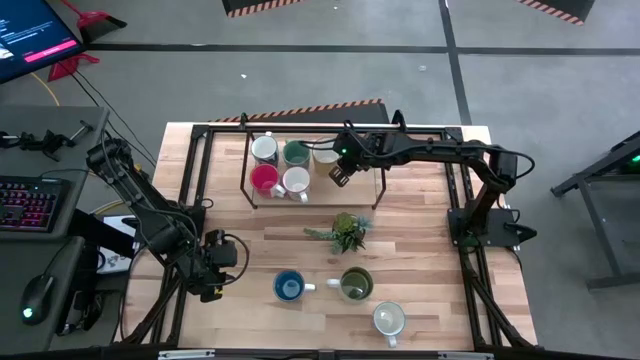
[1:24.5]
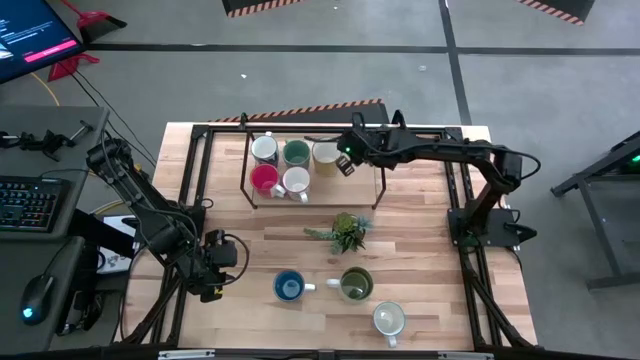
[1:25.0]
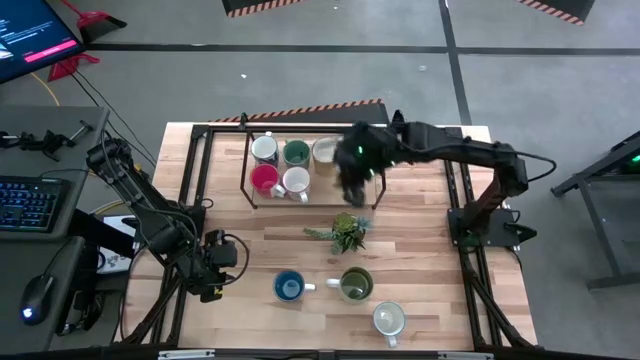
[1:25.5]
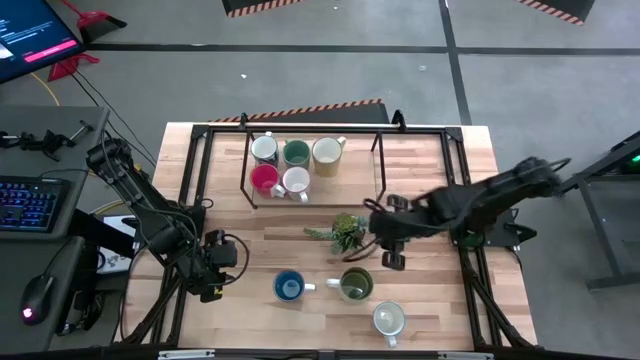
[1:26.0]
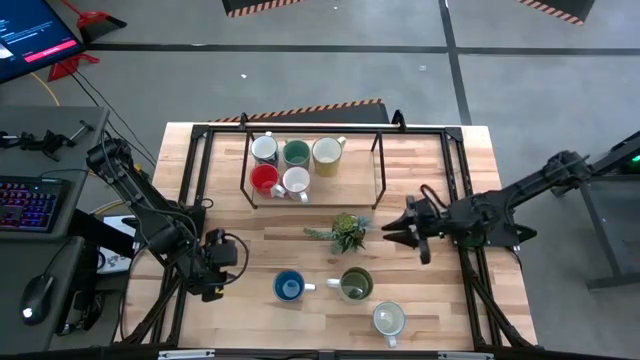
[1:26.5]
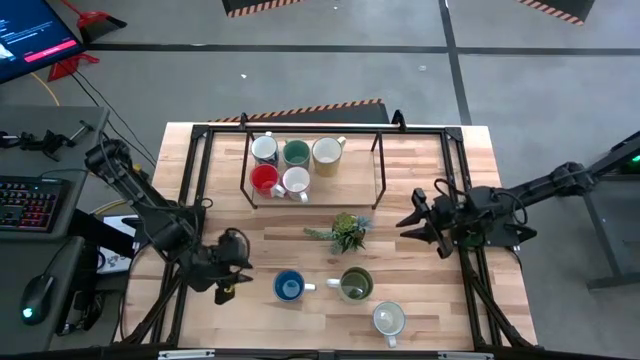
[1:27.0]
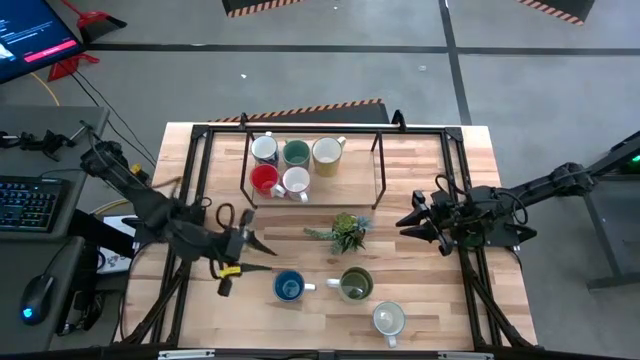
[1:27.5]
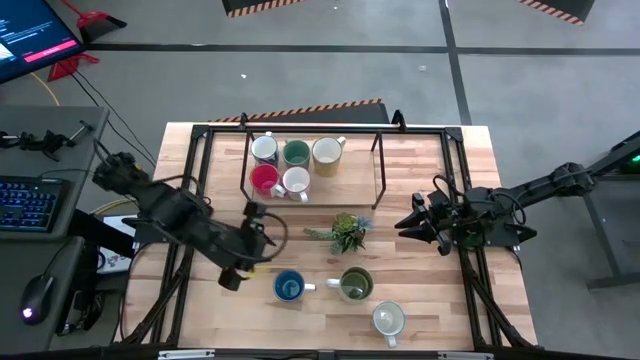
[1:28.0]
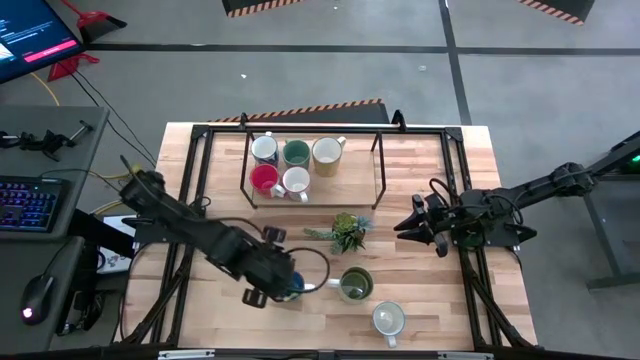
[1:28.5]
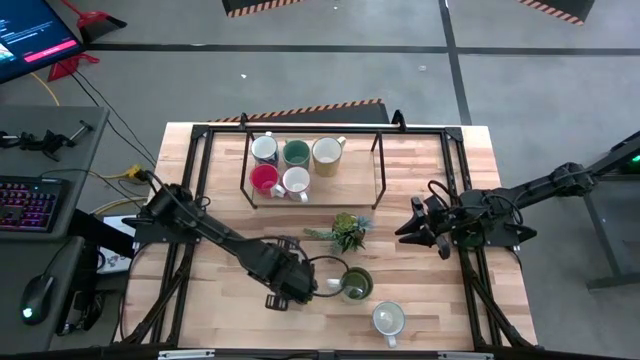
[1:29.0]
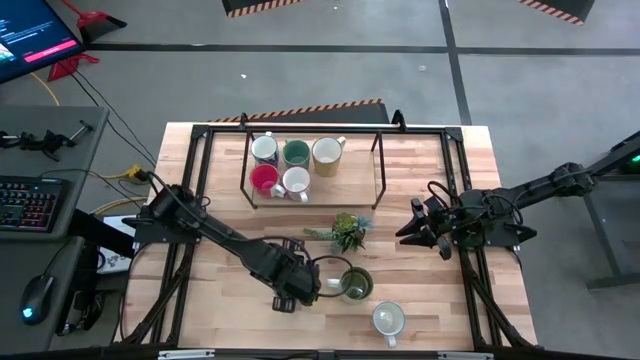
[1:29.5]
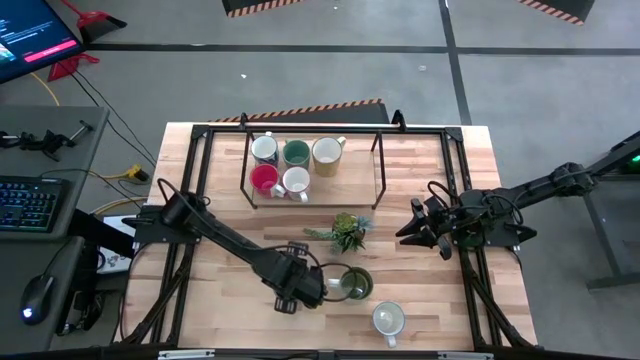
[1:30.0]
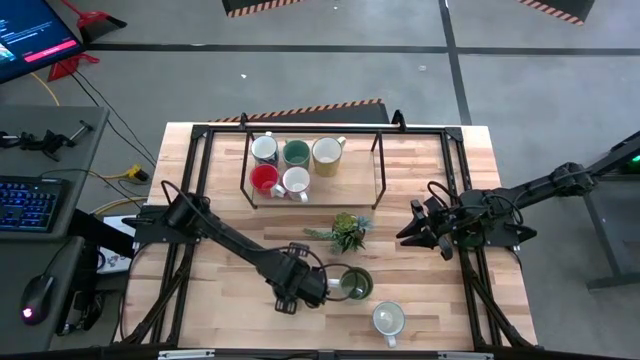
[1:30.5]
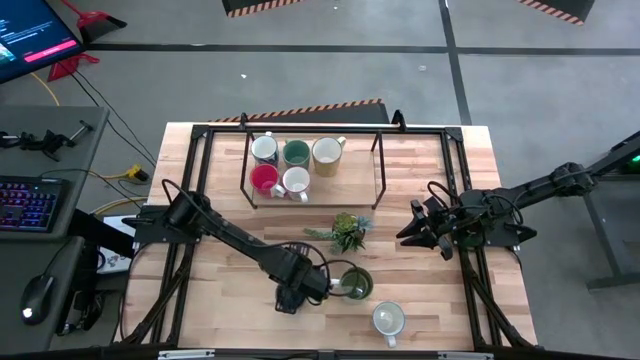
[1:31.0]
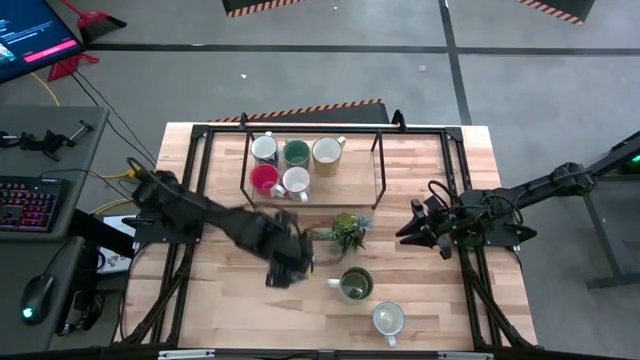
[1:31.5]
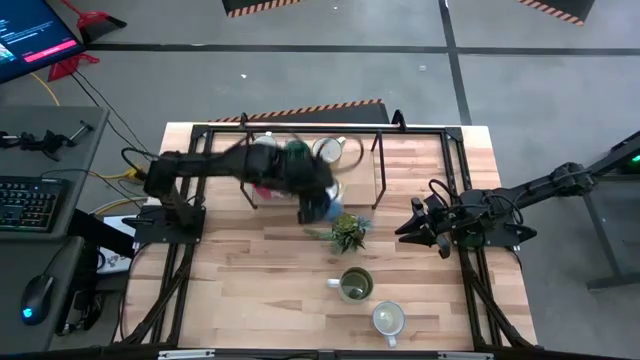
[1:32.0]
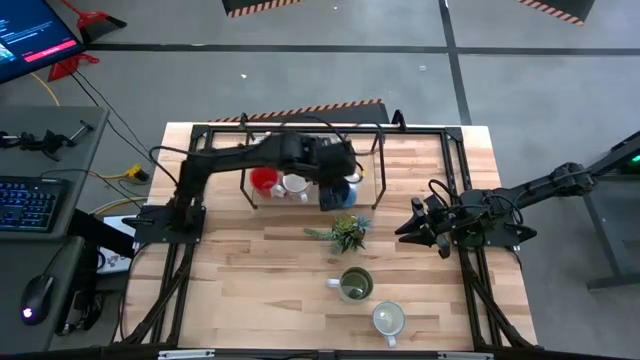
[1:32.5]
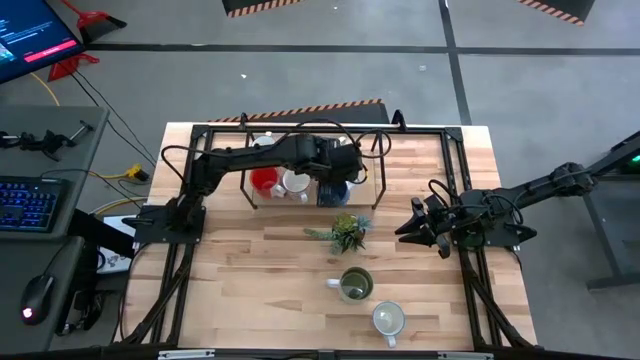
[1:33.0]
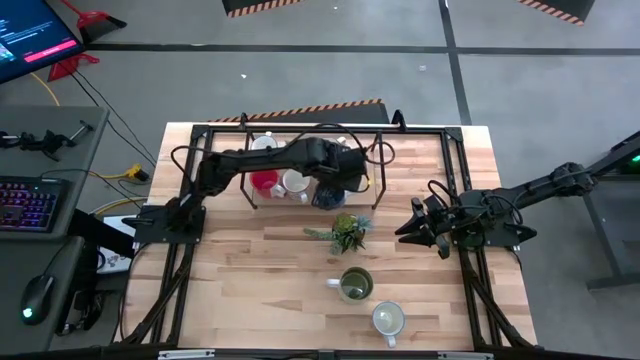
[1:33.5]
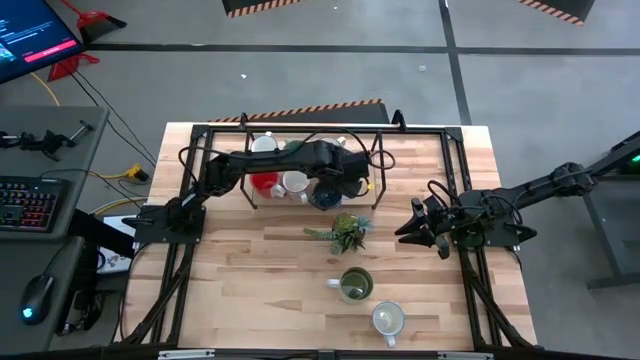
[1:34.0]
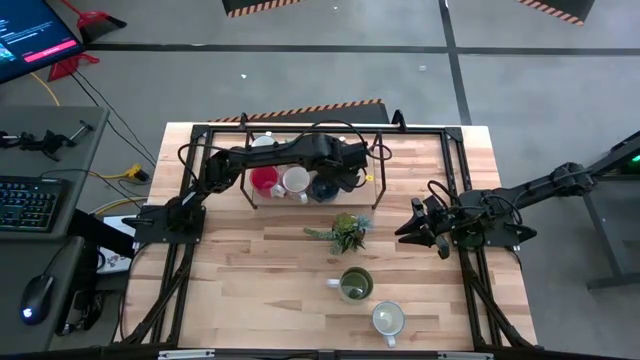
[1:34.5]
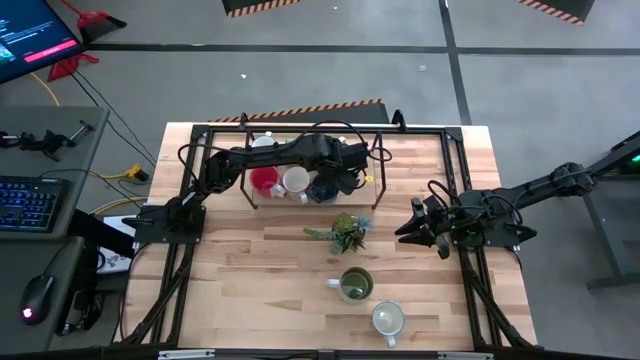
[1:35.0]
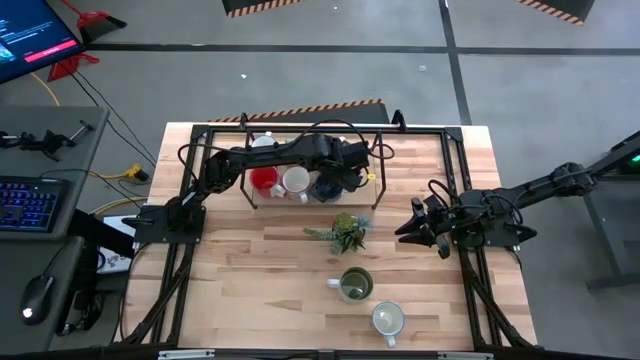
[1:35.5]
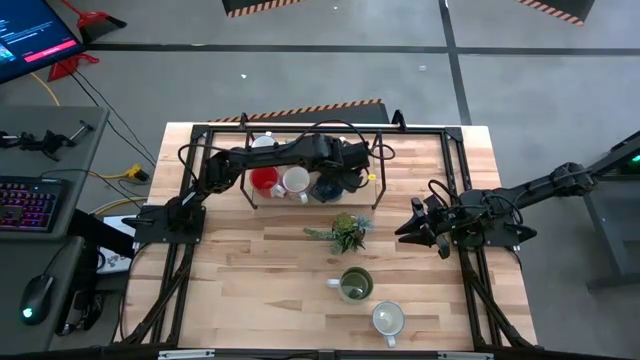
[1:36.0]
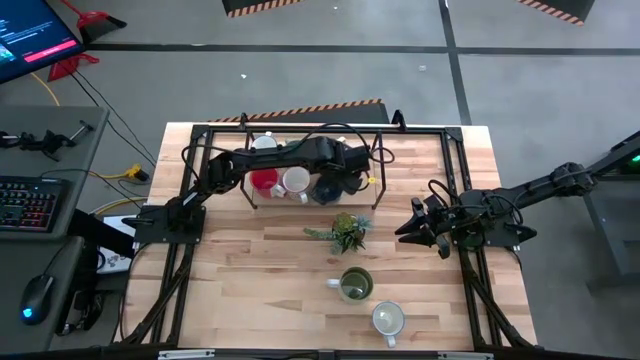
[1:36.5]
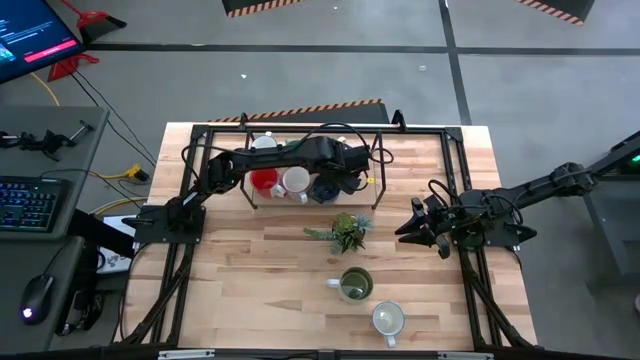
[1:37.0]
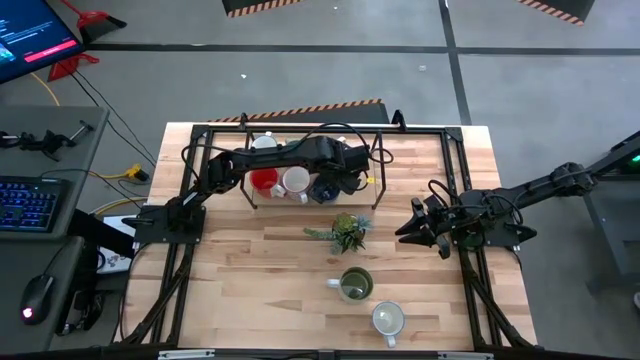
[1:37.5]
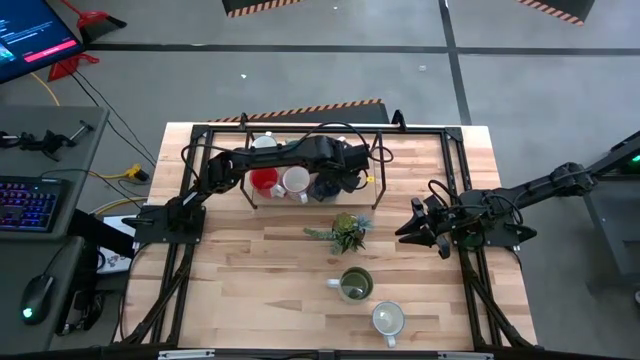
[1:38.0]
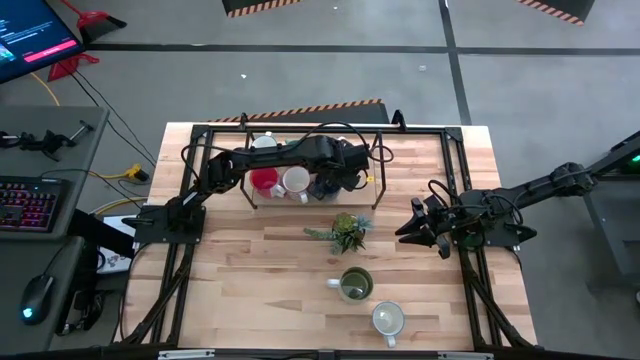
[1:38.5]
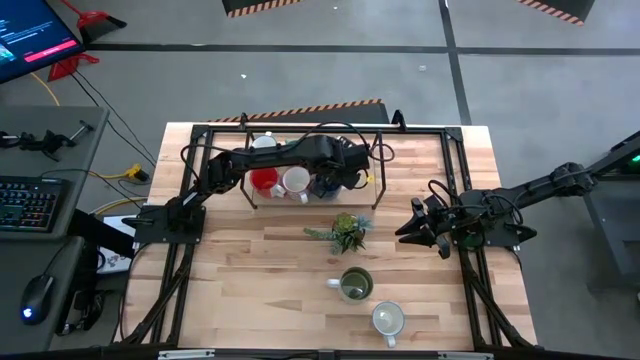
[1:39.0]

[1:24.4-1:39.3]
Task: Place coffee mugs
Put the blue mug on the shelf

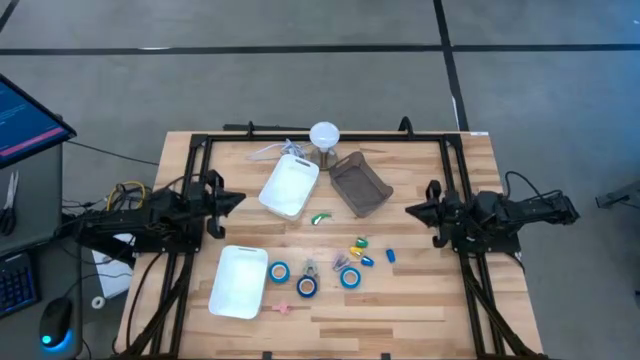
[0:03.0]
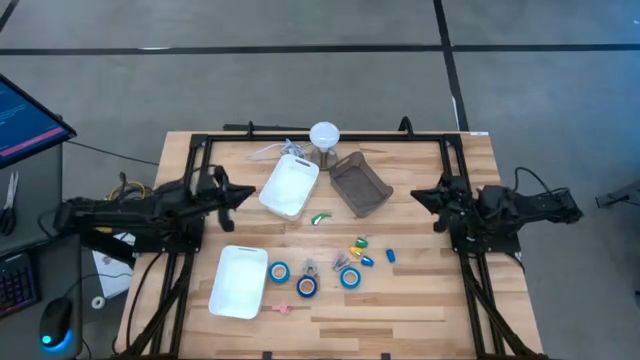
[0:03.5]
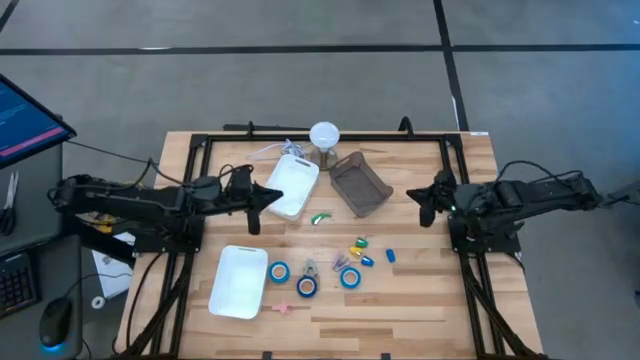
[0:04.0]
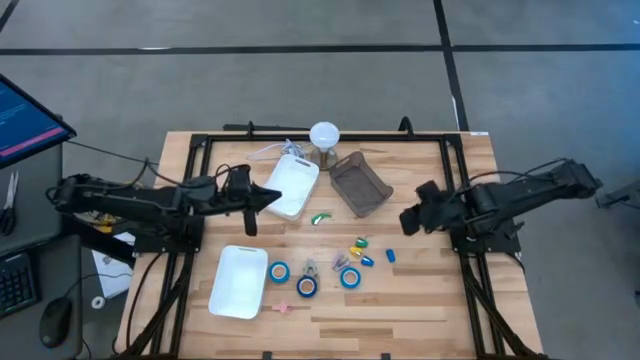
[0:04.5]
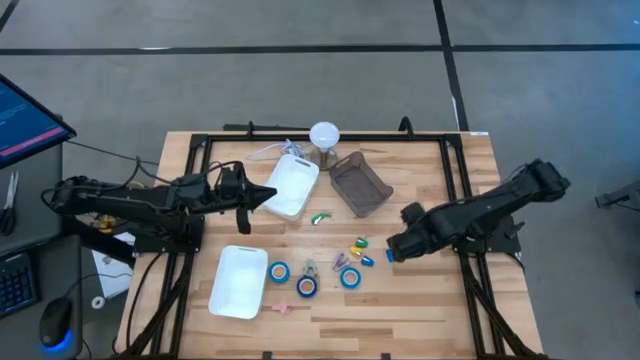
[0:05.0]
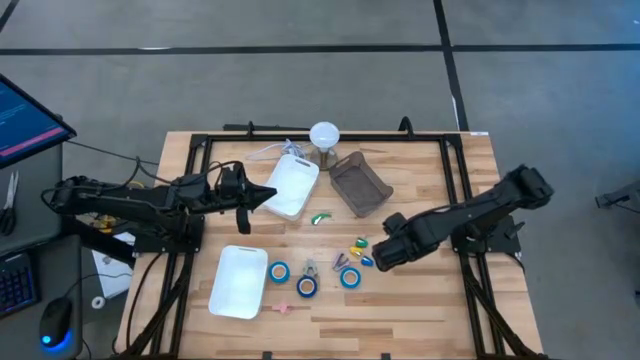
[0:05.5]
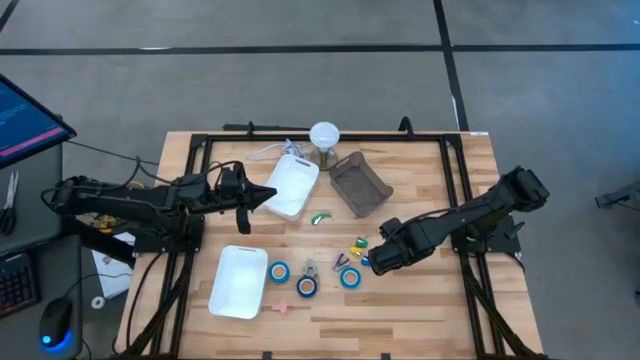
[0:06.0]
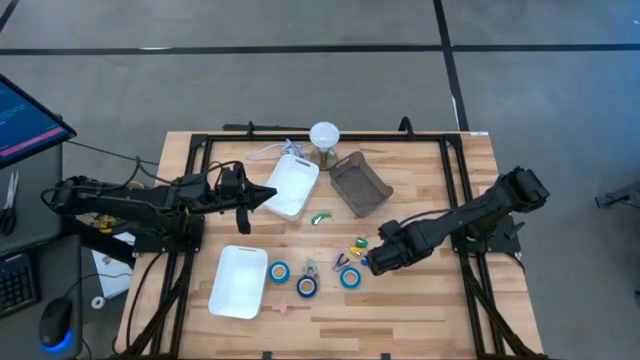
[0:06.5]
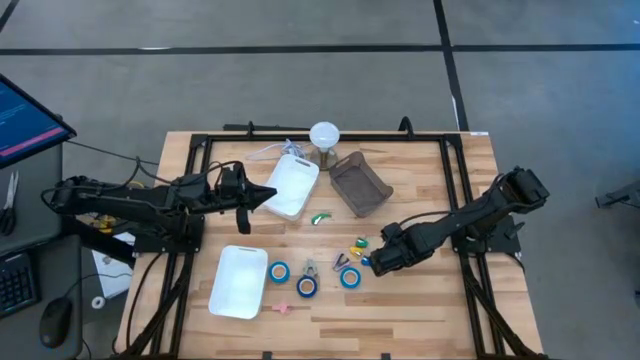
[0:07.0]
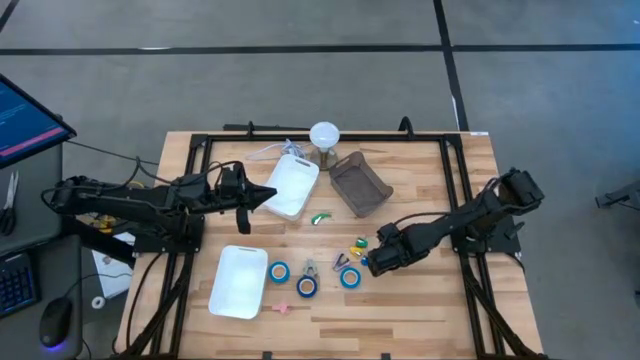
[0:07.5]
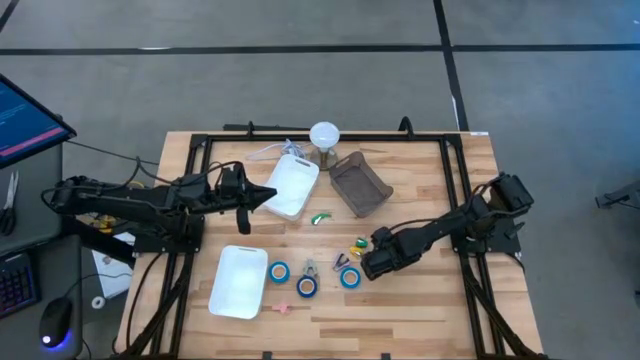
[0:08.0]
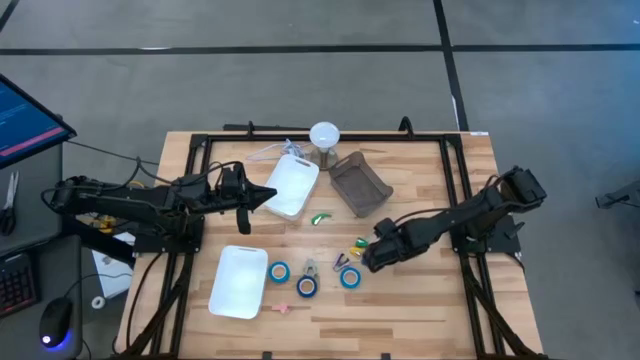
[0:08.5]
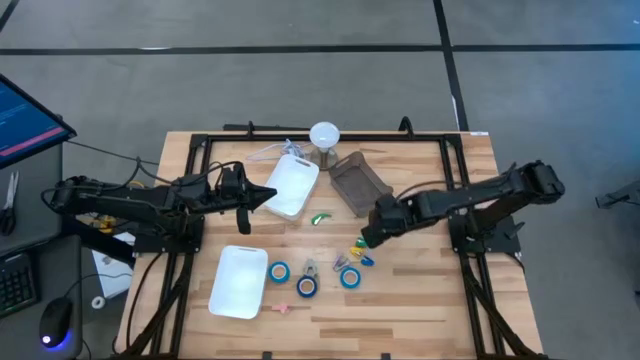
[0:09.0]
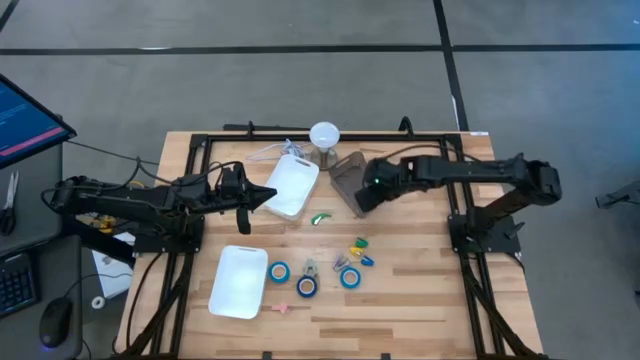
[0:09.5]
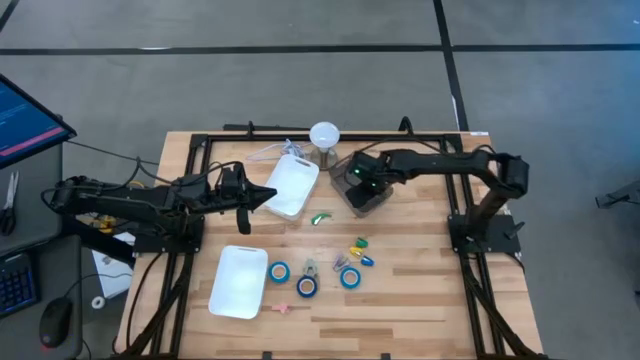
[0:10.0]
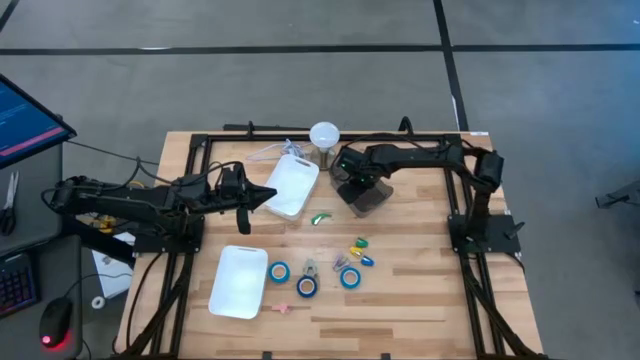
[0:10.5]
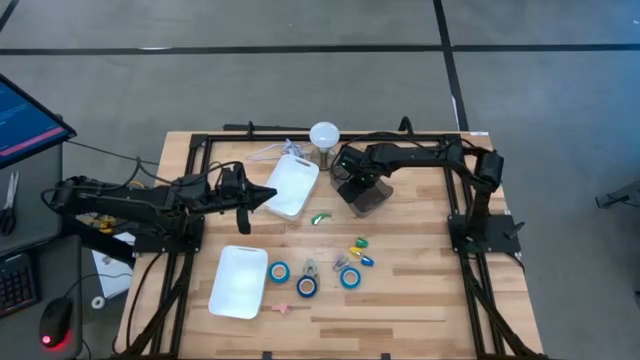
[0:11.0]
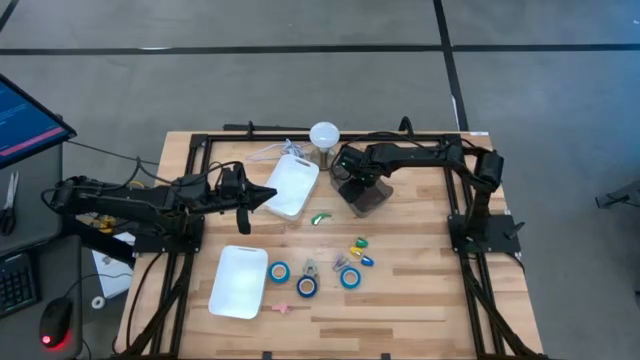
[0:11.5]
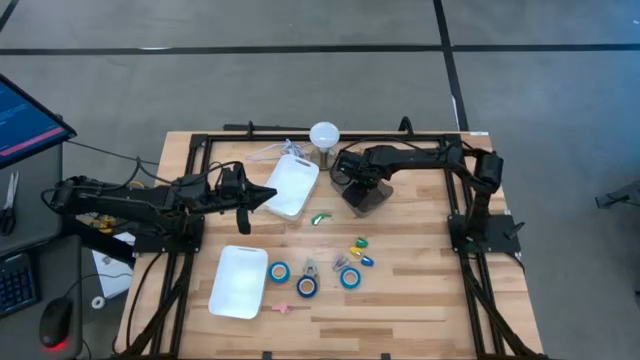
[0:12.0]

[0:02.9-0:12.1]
Task: Pick and place Stapler, Stapler remover, tape
Put the right blue stapler into the black bin
